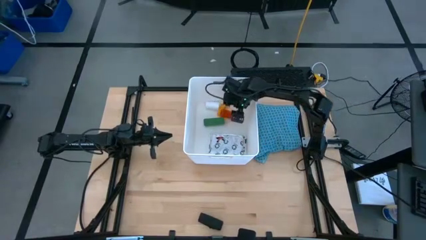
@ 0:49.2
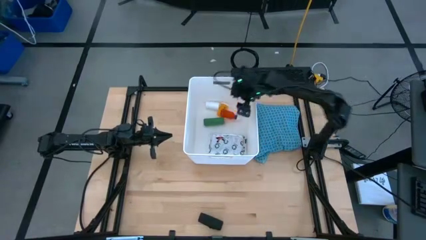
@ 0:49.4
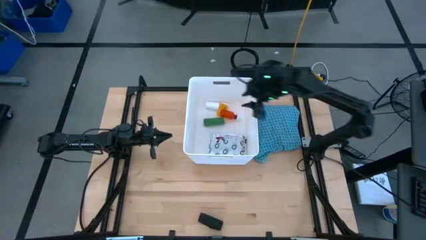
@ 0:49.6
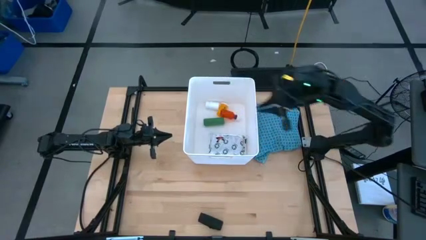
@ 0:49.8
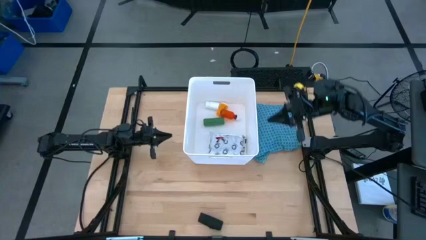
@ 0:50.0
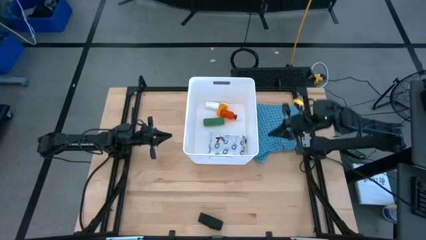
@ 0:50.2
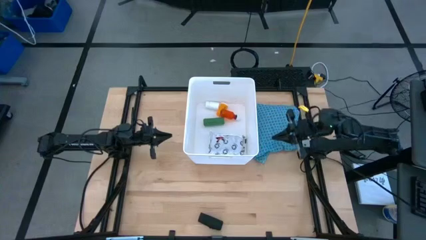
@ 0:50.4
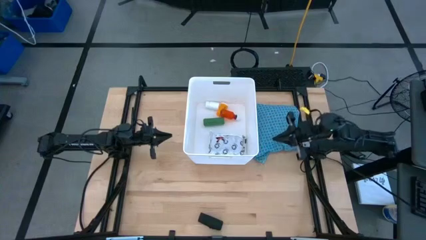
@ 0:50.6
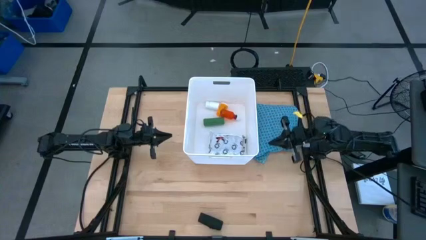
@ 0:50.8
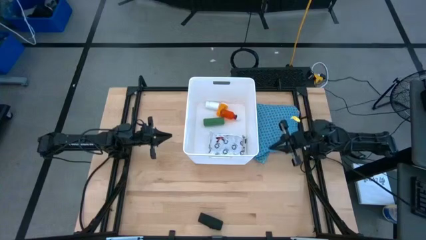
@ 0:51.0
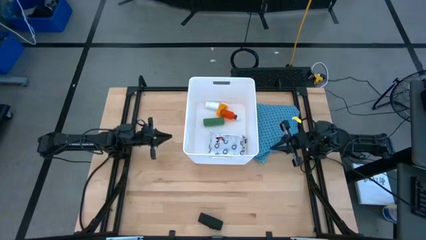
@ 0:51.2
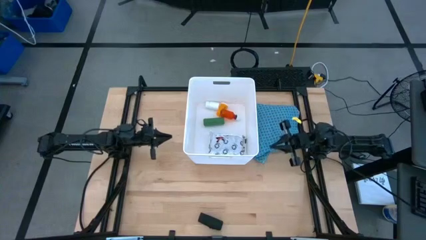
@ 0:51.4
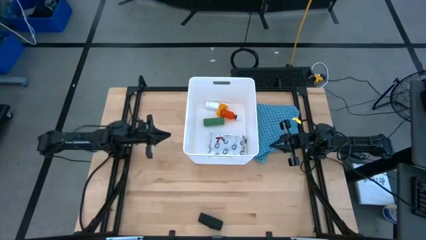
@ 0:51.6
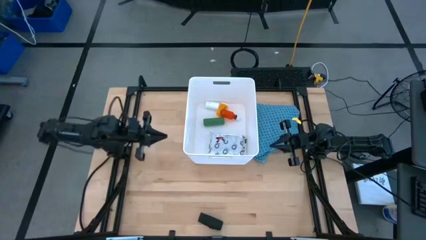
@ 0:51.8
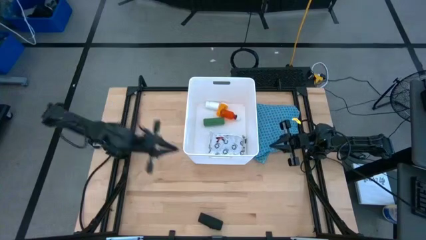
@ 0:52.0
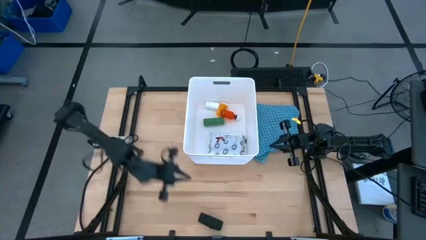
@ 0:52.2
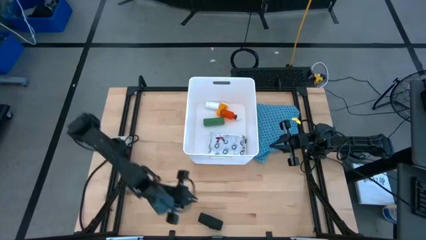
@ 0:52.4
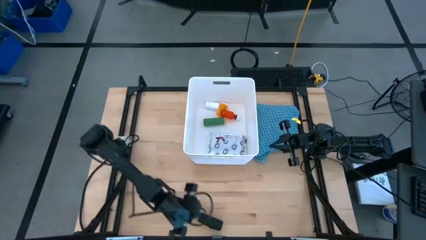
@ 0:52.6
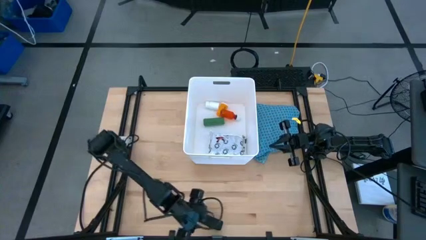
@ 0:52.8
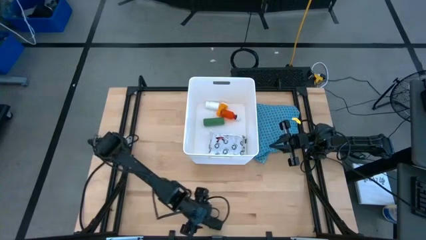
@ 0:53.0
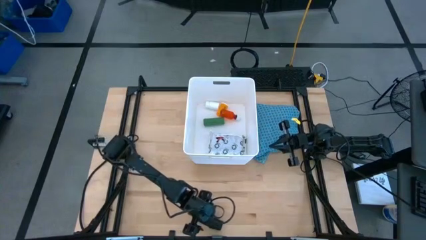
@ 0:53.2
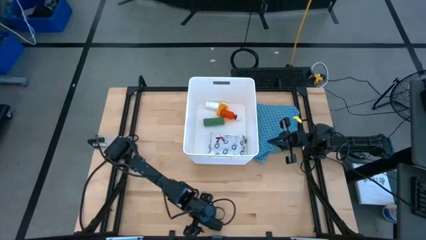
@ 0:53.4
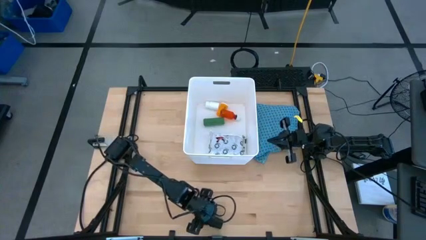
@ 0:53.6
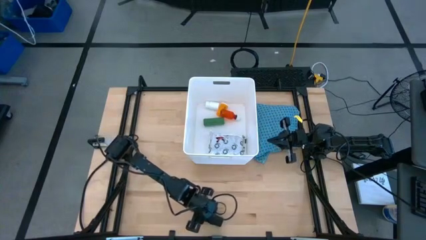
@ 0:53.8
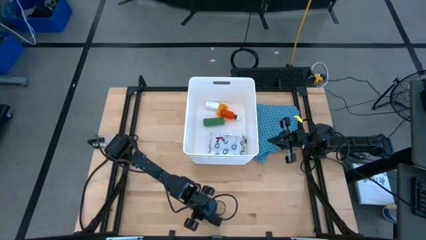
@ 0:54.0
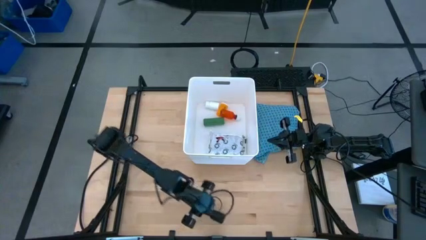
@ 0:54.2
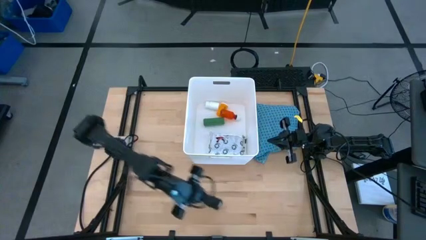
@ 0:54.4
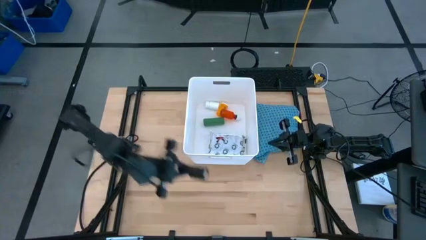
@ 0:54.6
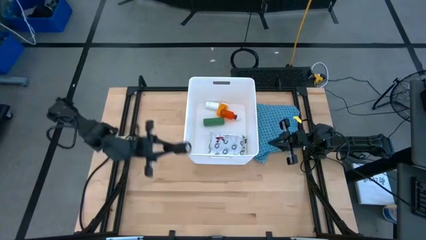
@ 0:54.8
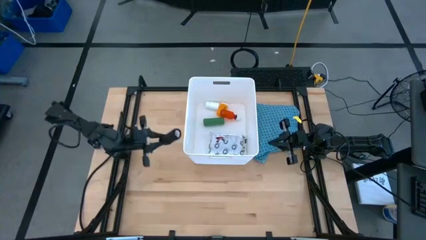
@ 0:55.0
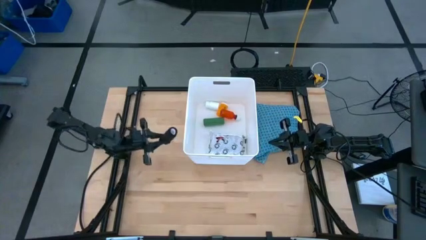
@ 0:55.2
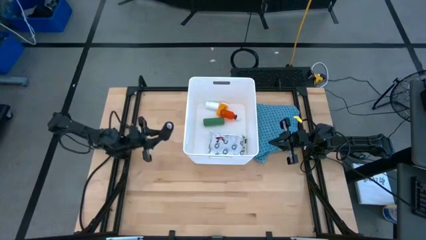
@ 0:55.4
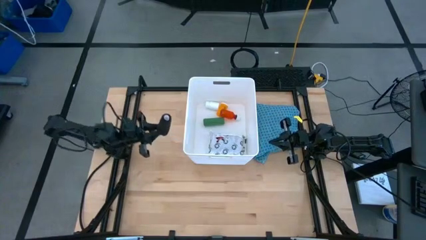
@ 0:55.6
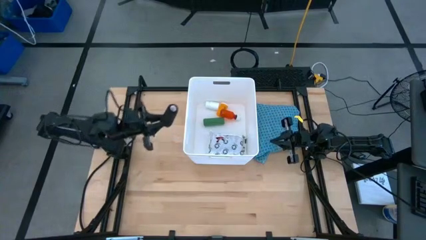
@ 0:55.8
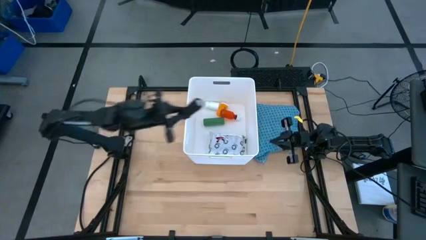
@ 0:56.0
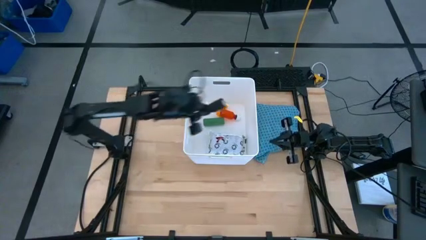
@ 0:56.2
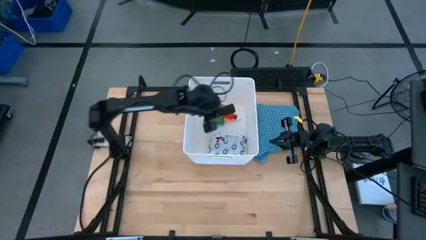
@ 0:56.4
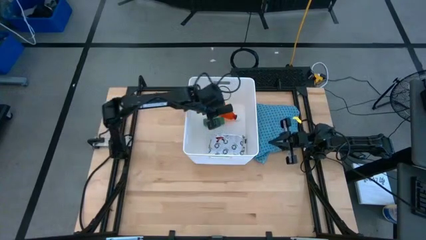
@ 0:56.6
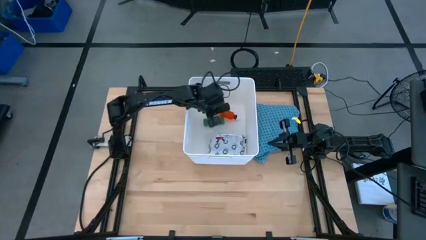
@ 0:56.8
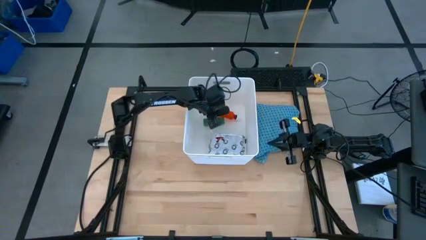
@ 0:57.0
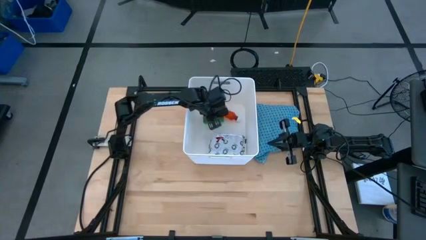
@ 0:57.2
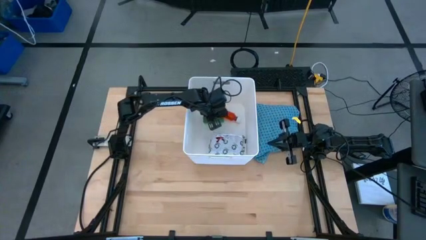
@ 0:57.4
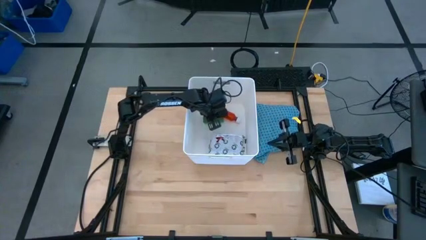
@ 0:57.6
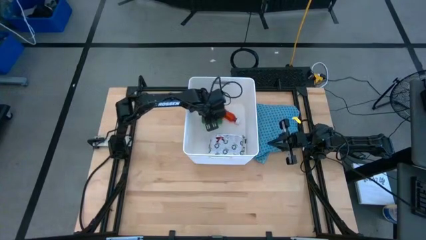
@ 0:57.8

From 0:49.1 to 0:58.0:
Task: Pick & place medical supplies in basket/bin
Put the black bandage into the white bin

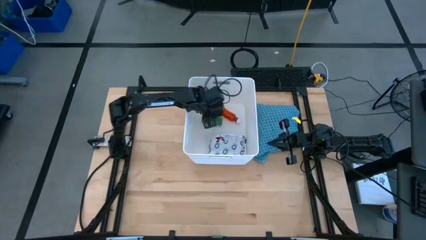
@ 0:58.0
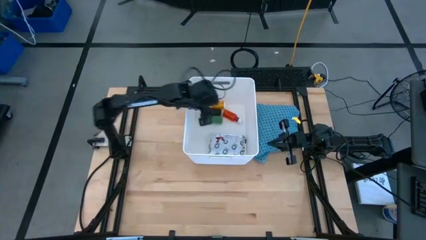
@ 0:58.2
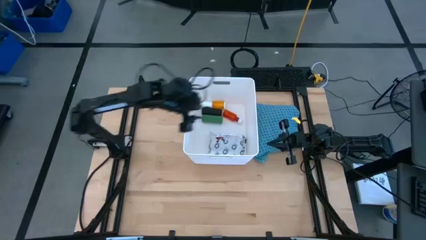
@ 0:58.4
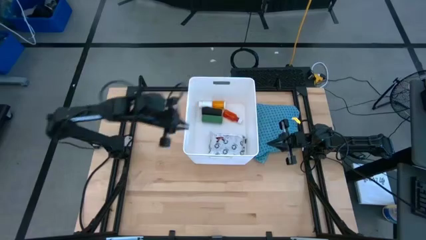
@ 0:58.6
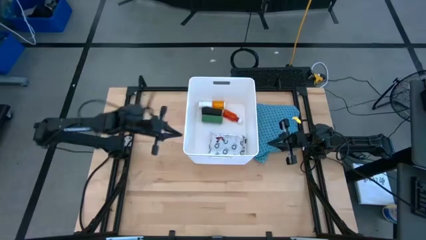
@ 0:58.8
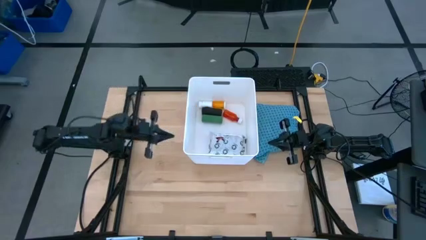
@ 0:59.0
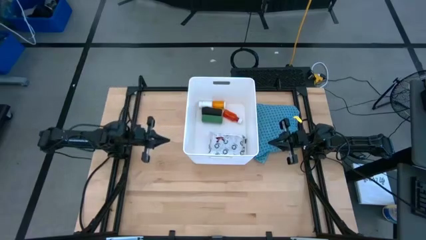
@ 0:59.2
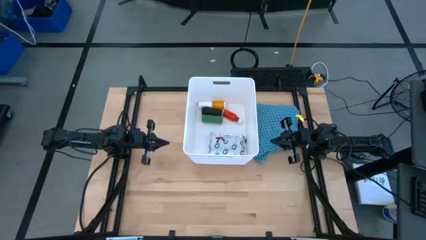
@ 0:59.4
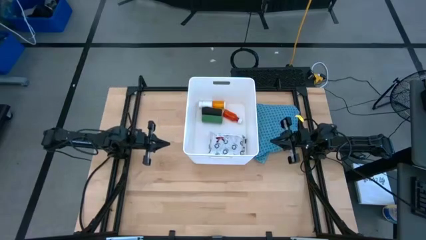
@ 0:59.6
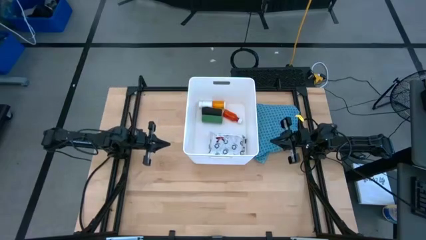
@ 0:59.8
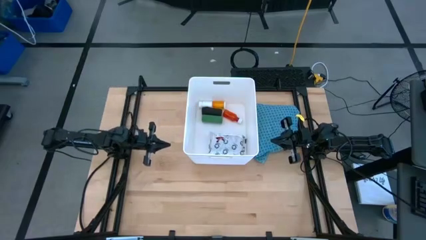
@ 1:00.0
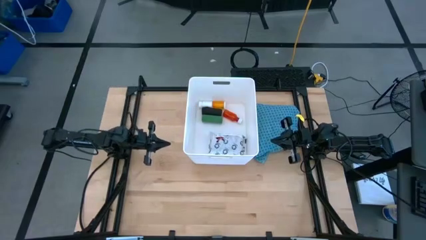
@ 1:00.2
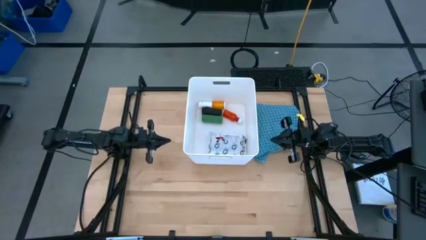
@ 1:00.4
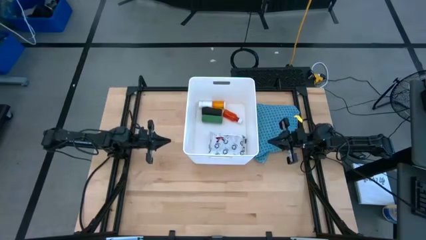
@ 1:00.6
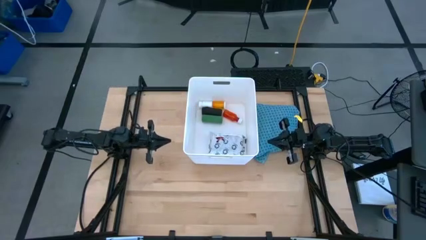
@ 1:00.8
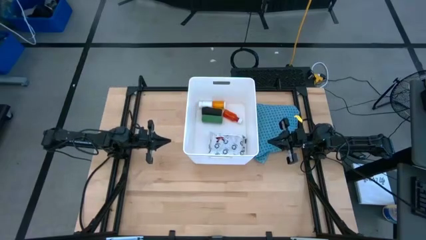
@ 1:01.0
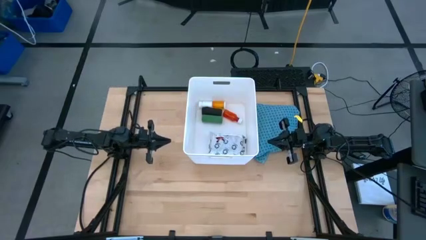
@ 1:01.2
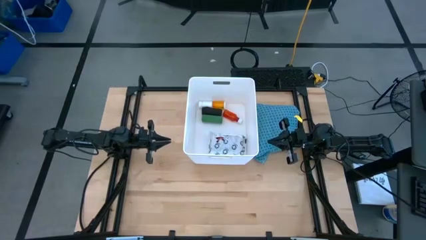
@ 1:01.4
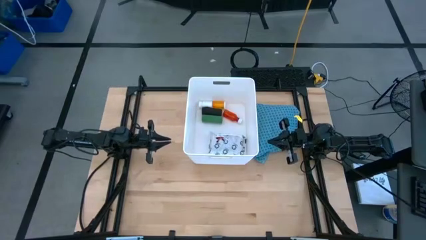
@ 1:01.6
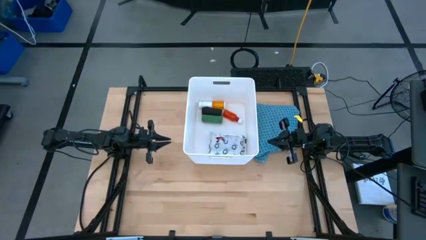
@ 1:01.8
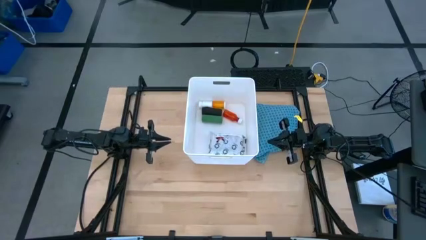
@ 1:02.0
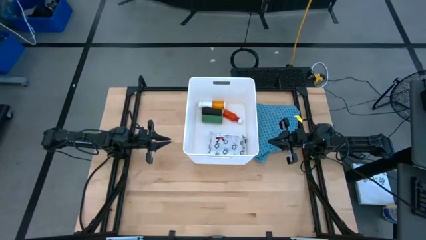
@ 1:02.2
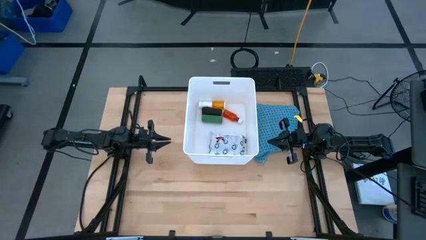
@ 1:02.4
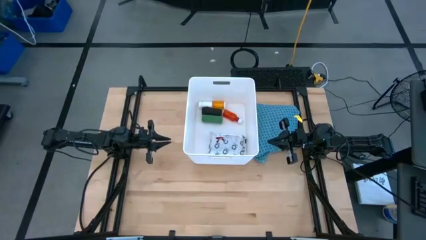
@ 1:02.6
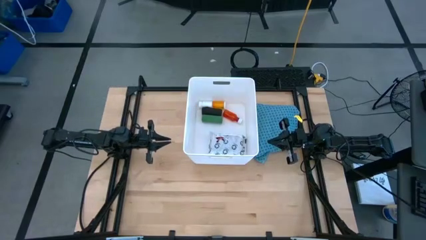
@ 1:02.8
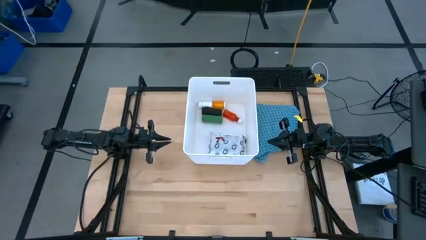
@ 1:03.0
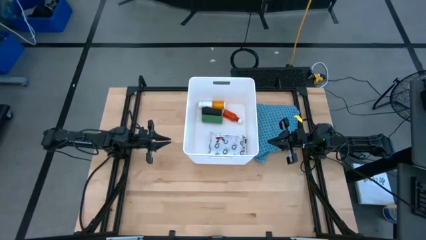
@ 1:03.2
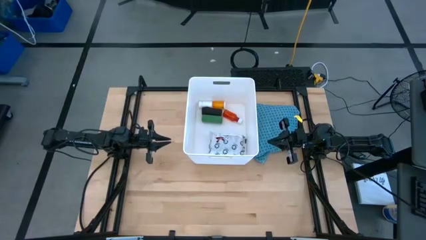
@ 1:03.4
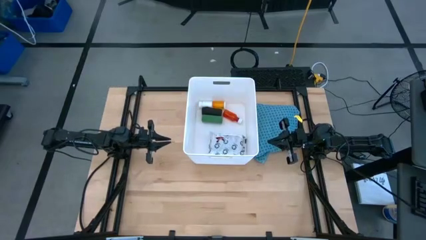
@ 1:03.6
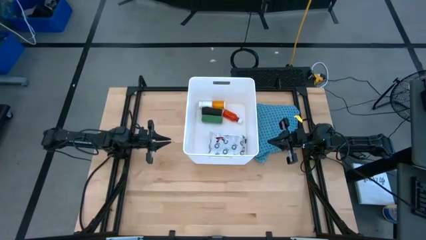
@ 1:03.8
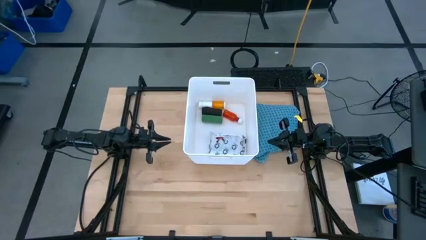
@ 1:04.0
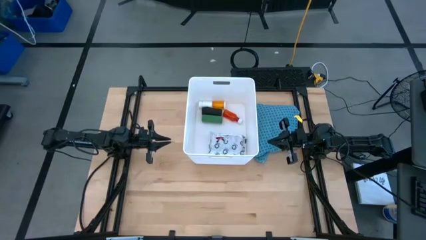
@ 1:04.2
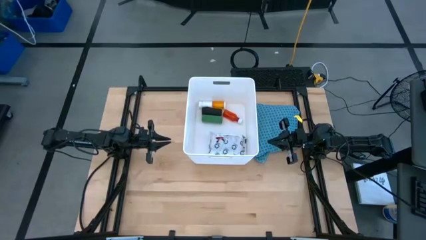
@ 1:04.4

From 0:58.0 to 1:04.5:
Return to Home Position

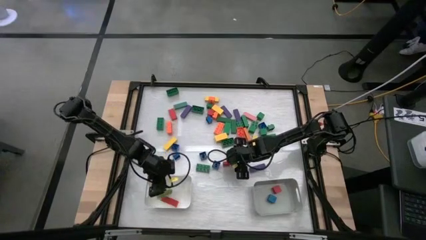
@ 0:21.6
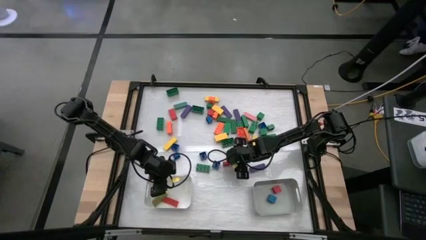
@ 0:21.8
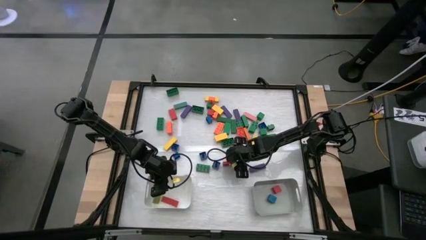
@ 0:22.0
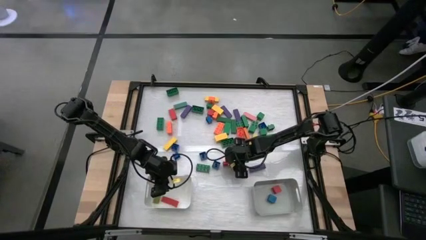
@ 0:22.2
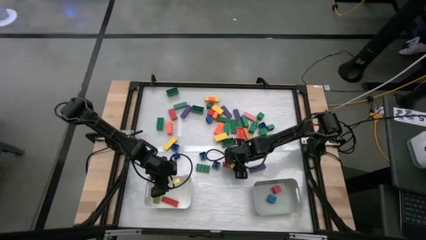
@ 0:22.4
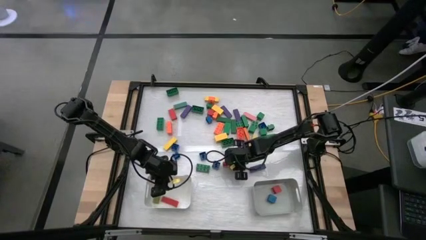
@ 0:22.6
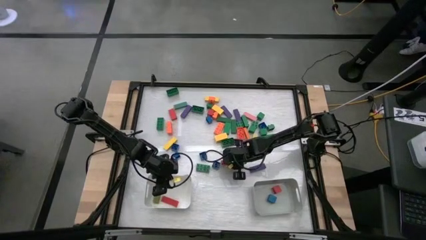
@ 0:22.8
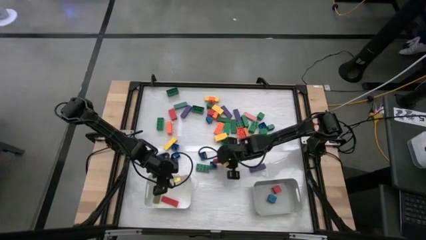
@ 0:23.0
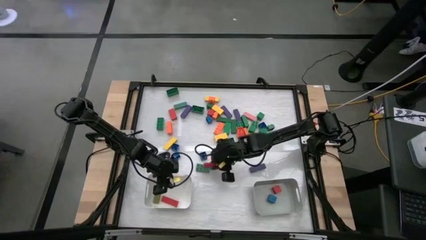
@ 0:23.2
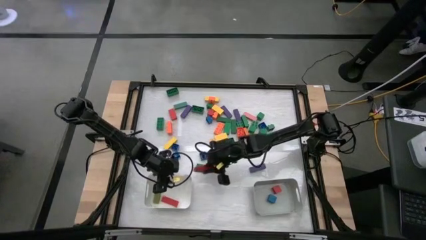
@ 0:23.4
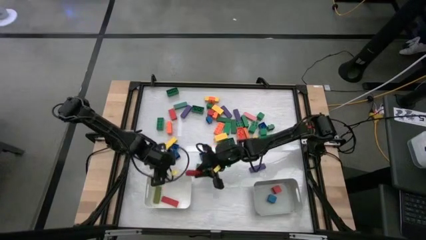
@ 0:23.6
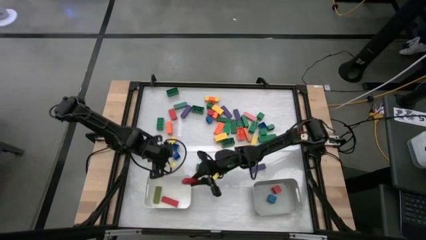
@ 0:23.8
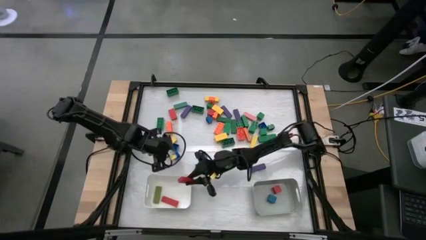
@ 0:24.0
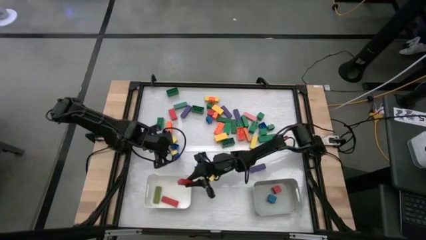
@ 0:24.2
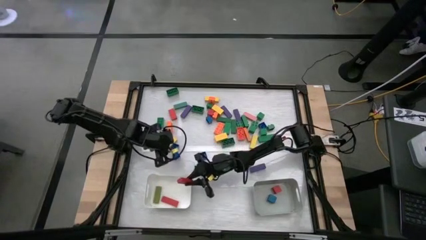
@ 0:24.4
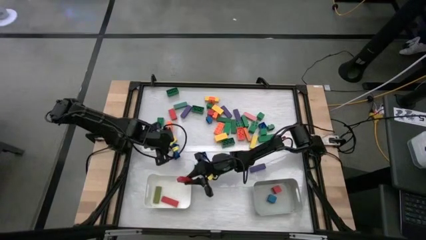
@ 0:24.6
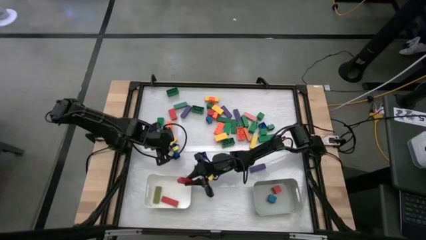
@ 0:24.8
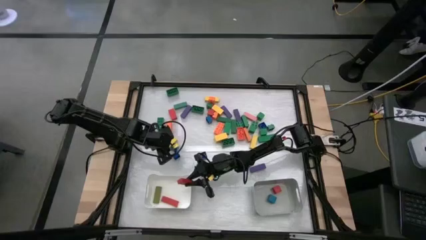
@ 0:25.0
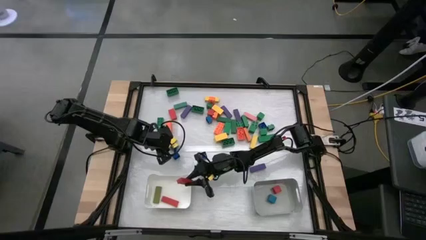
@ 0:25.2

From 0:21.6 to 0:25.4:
Task: Sort blocks by size
Put the rectangular red block into the white bin
